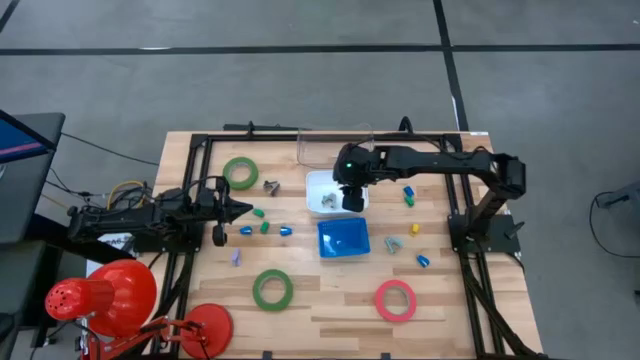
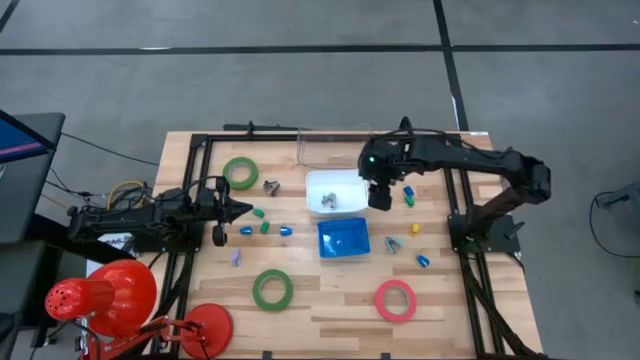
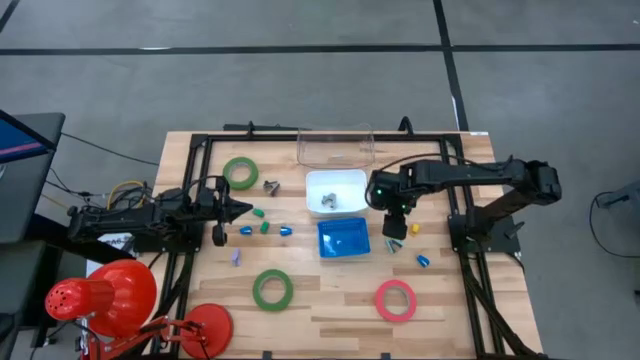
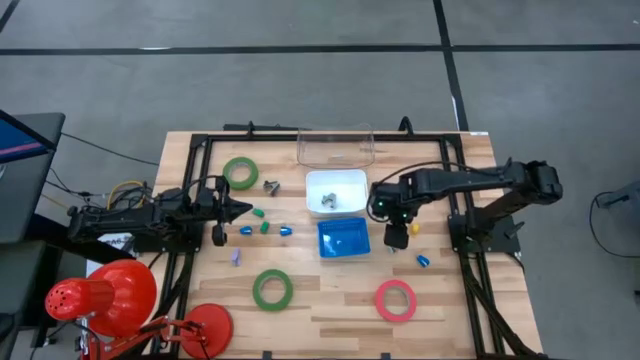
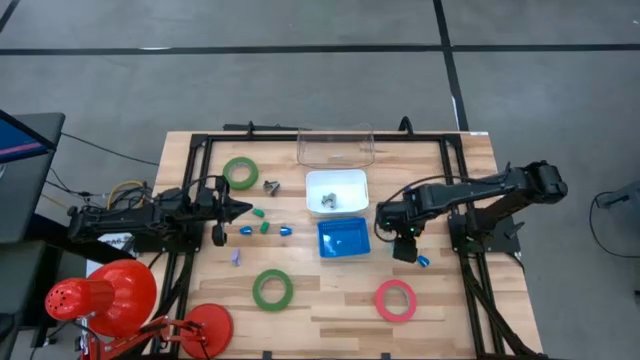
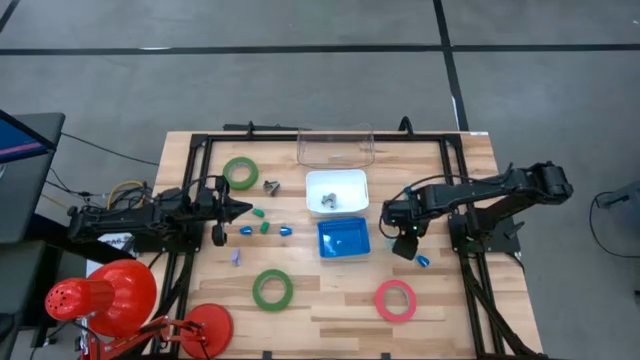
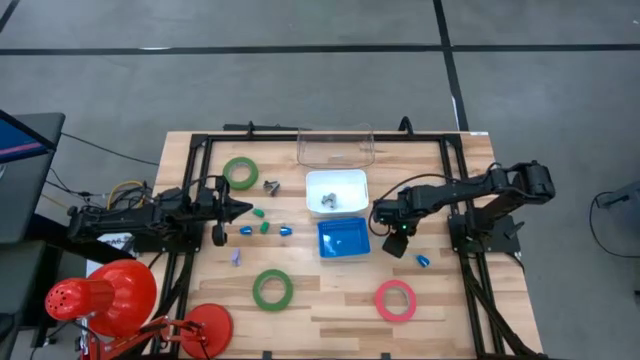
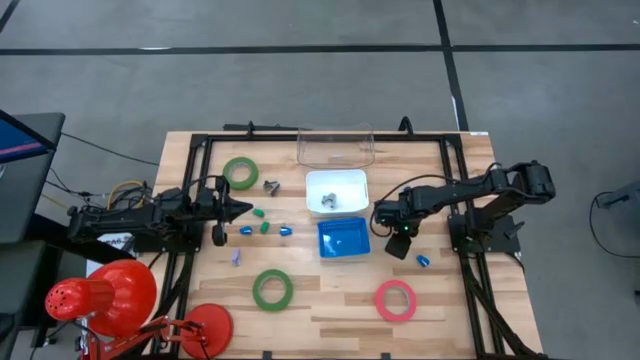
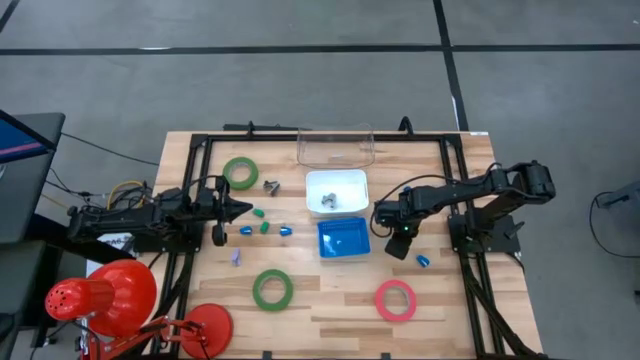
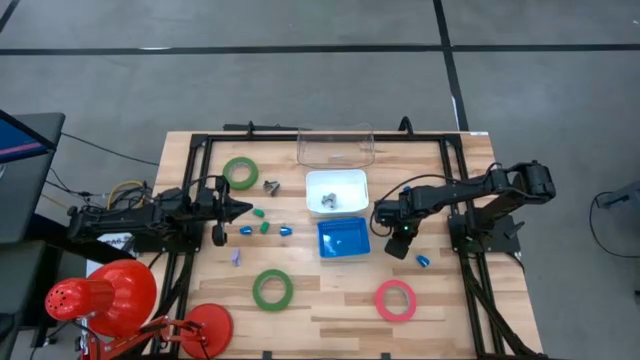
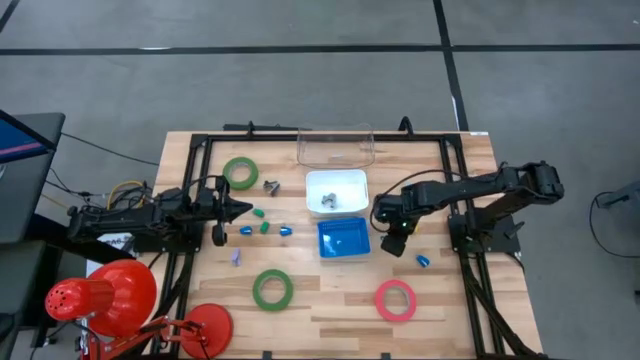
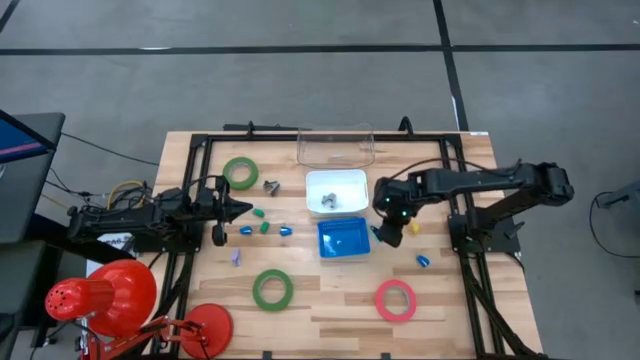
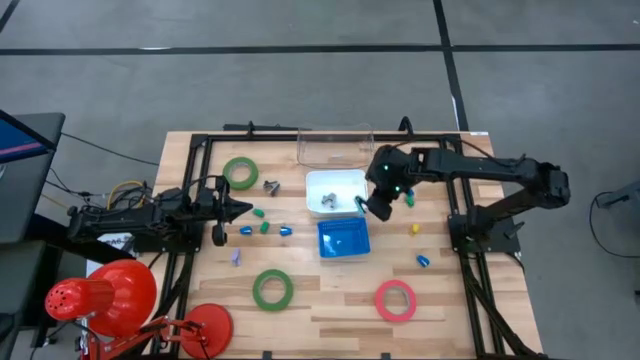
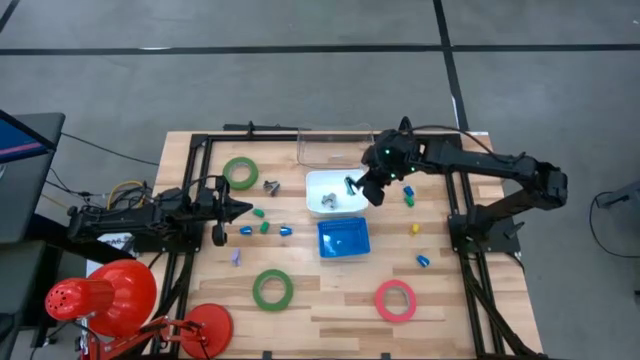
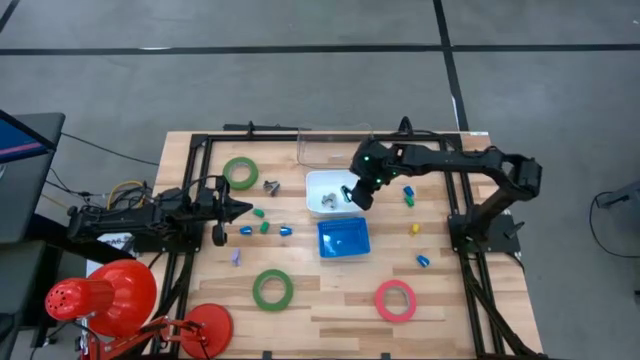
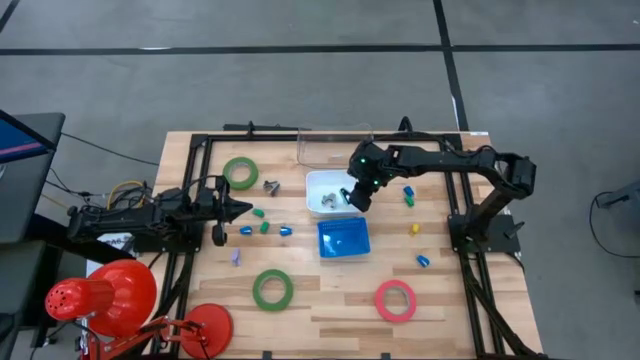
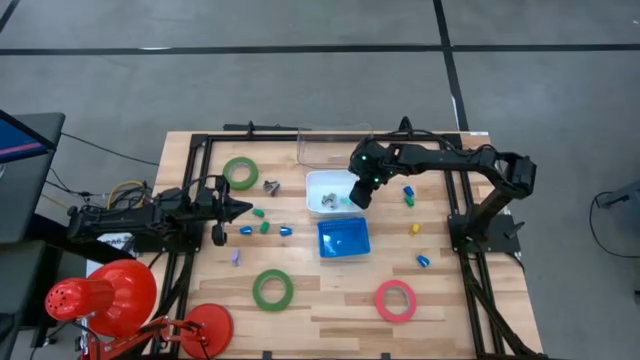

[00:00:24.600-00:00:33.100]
Task: Pick and place Stapler, Stapler remover, tape
Put the light blue staple remover into the white bin

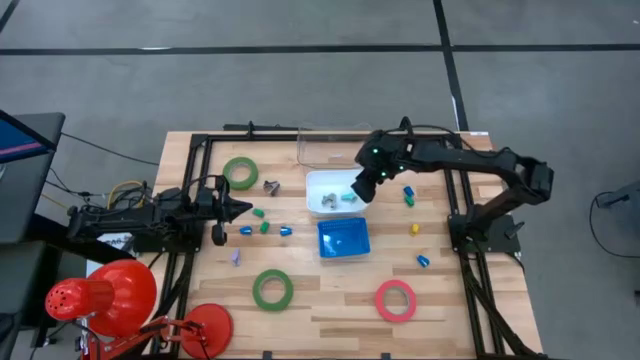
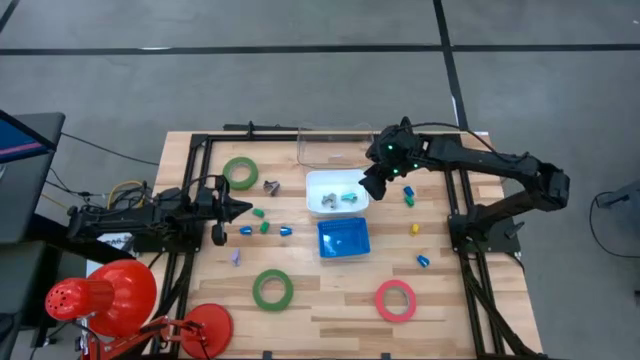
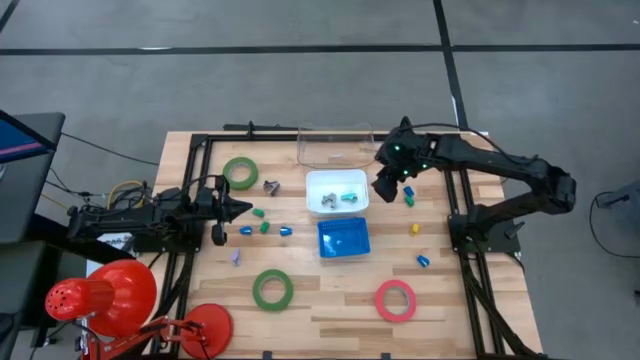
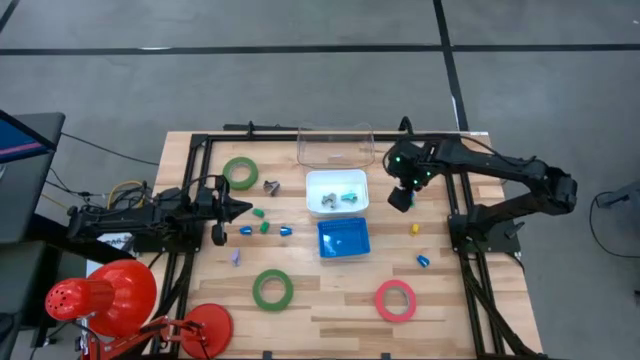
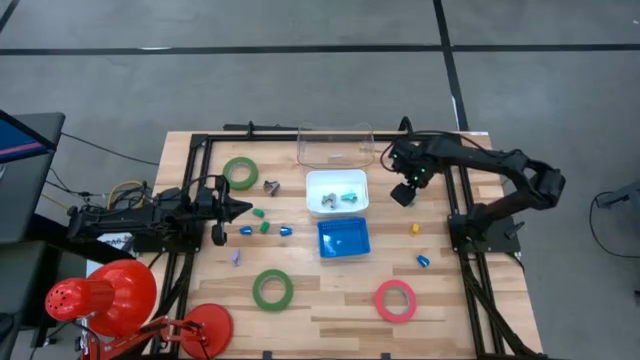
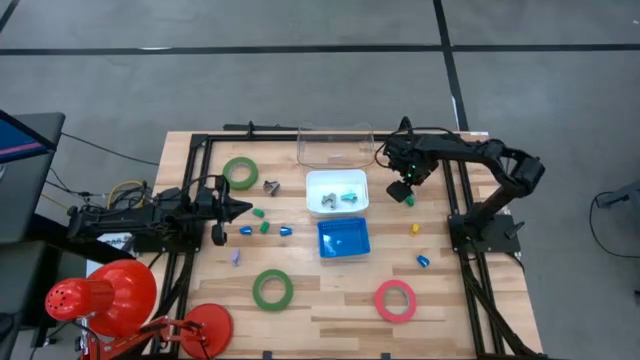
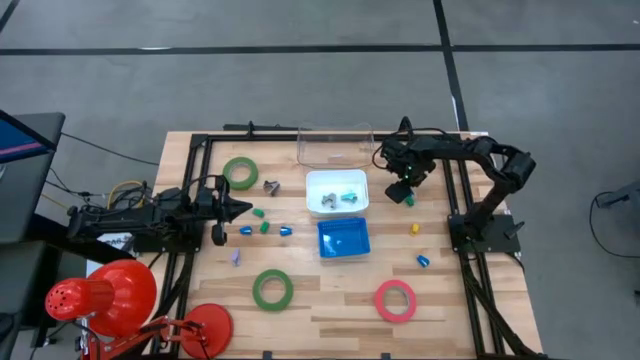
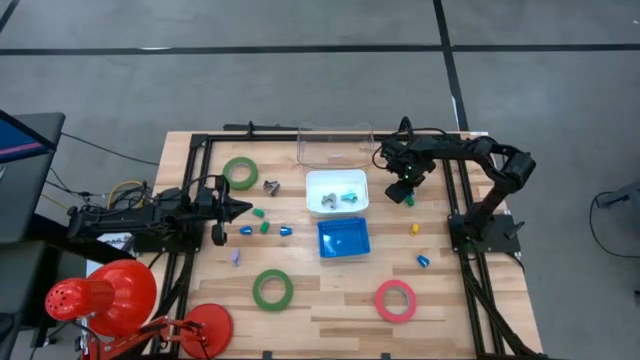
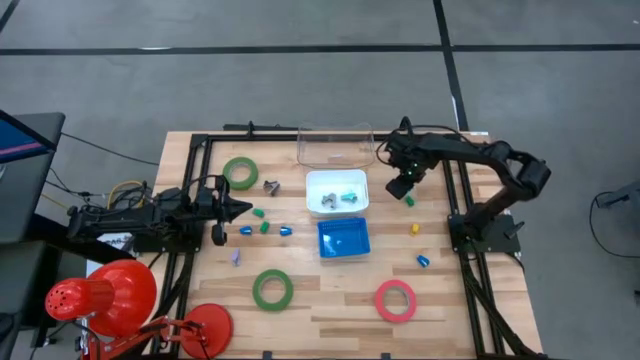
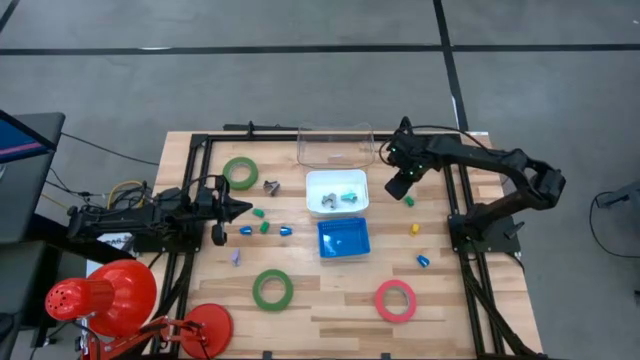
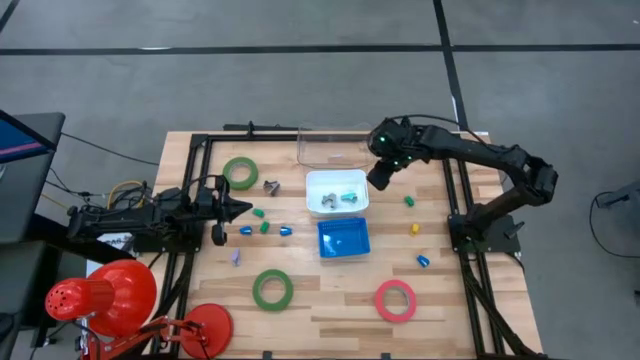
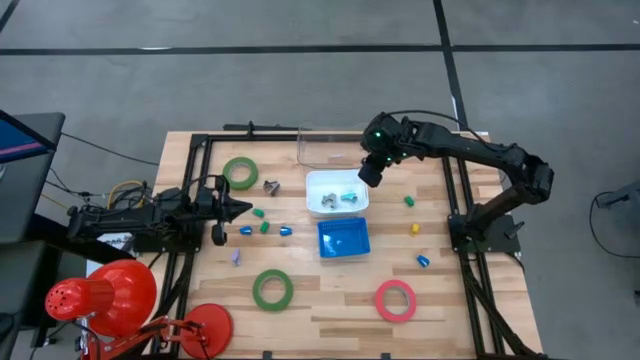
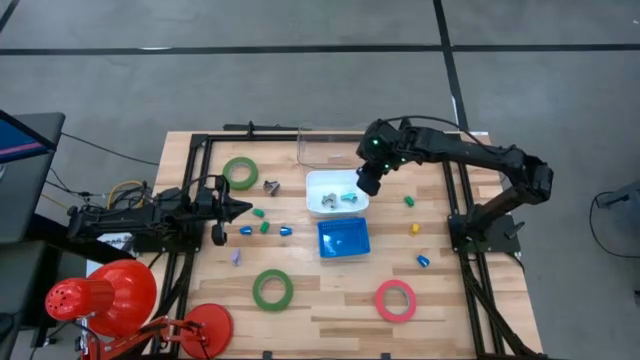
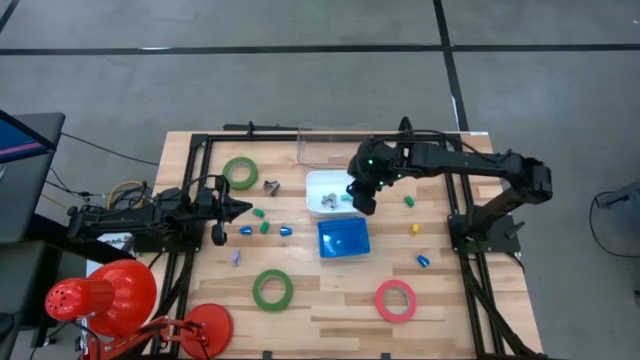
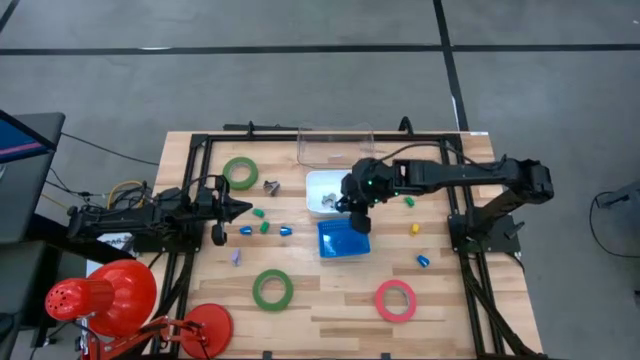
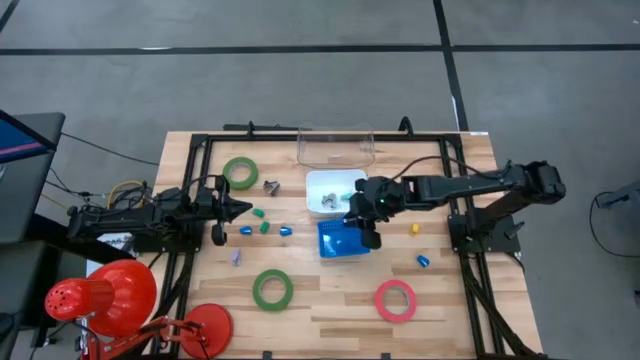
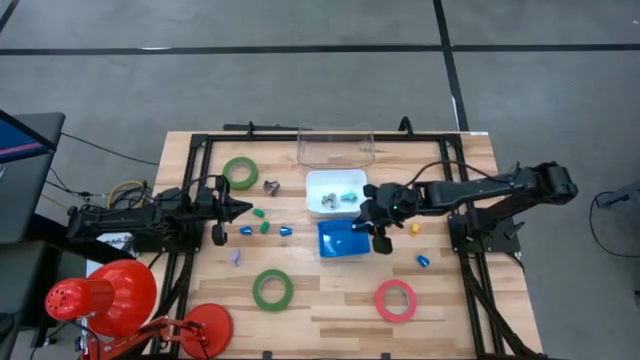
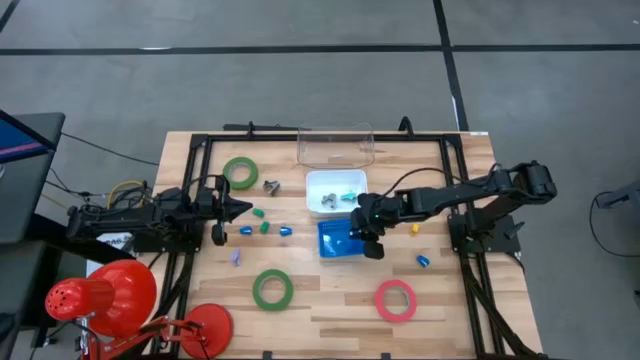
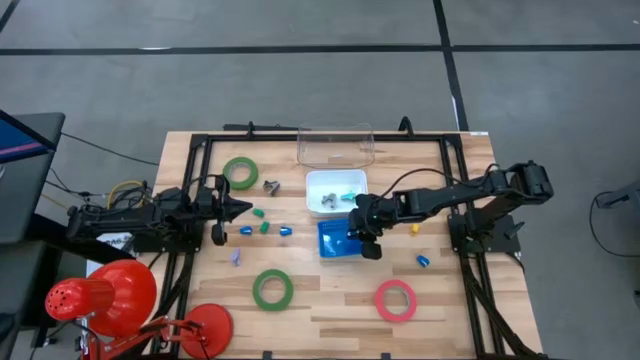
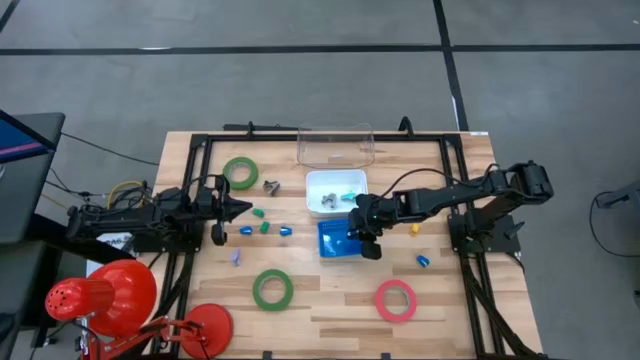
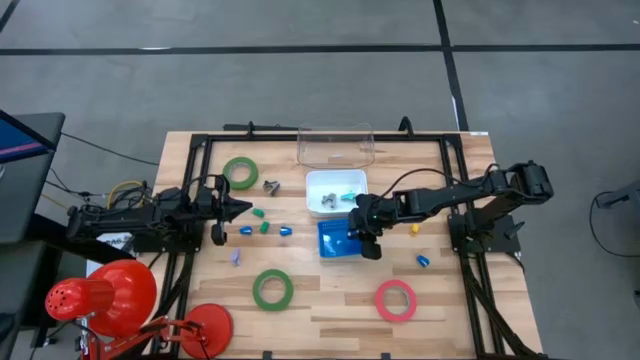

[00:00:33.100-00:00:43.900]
Put the blue stapler into the blue bin

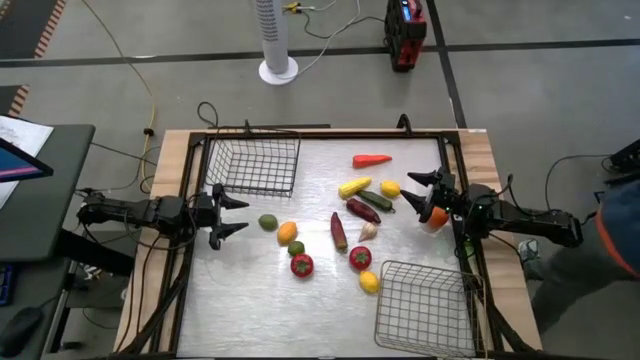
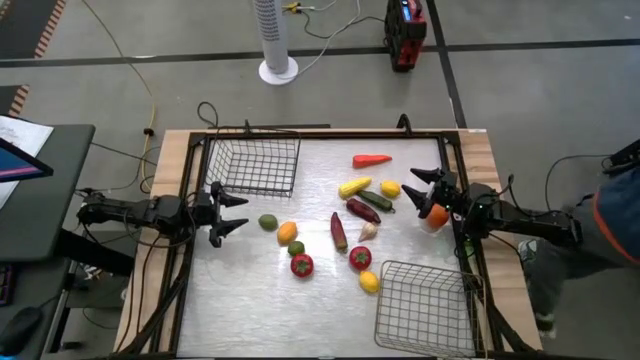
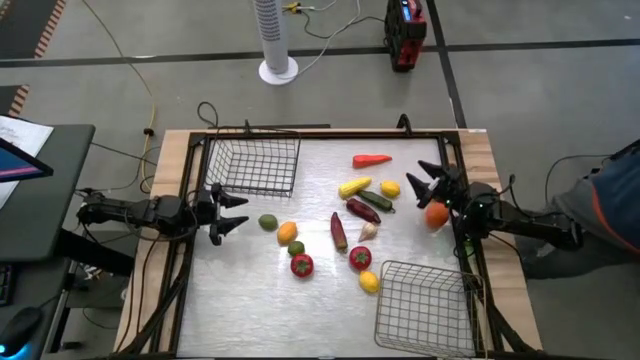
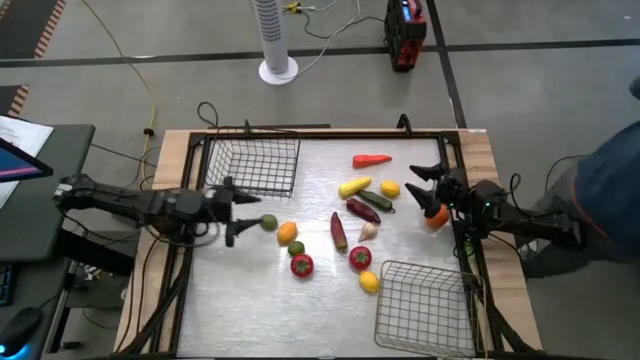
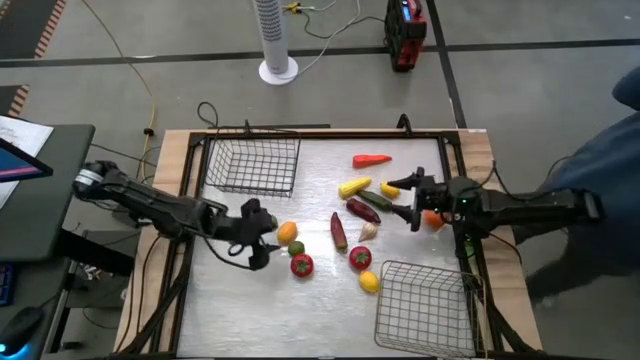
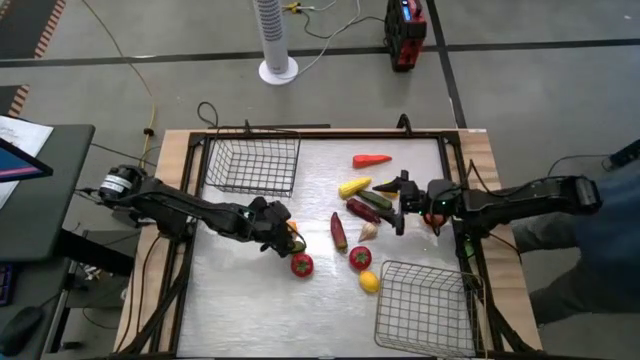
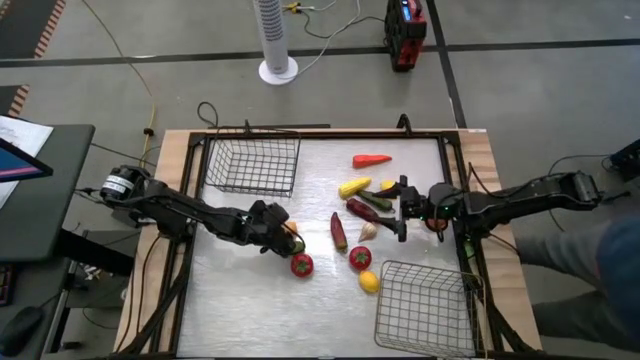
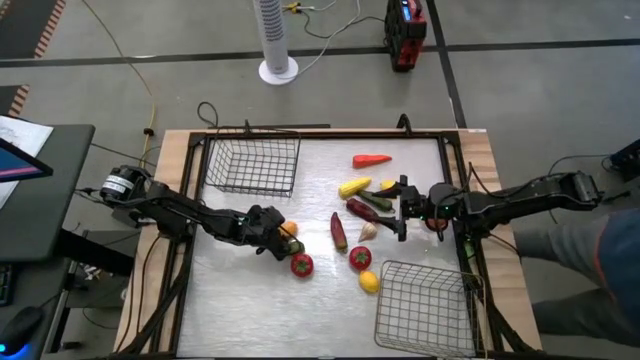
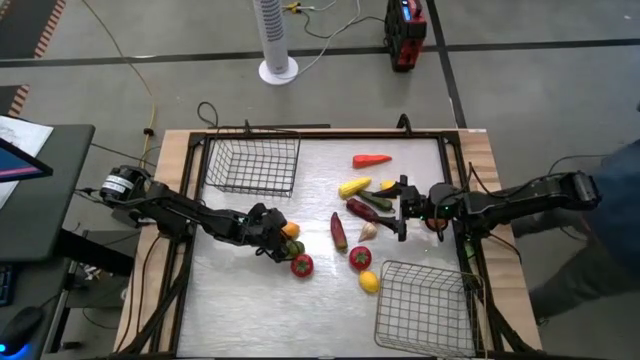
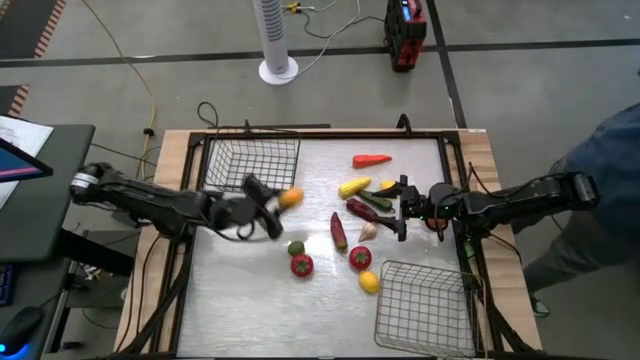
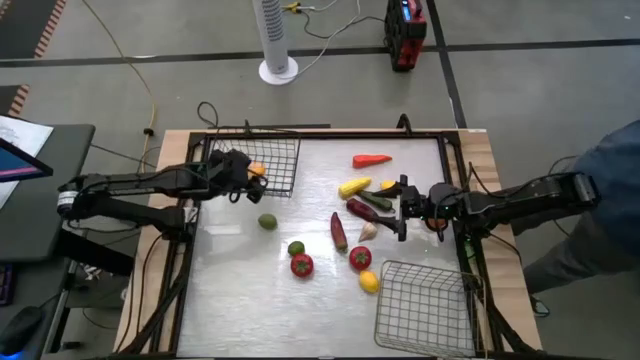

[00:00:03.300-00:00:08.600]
Task: Sort produce into baskets
Put the left lemon into the black wire basket
